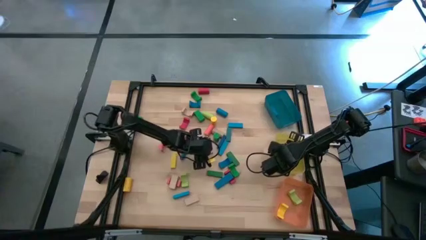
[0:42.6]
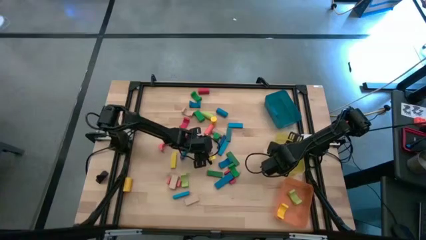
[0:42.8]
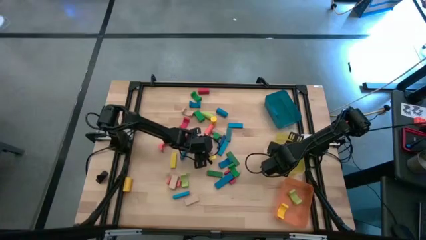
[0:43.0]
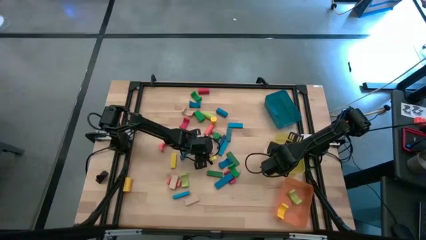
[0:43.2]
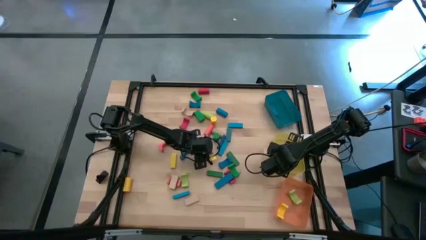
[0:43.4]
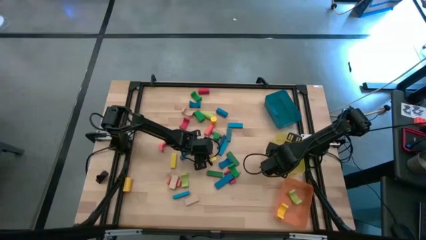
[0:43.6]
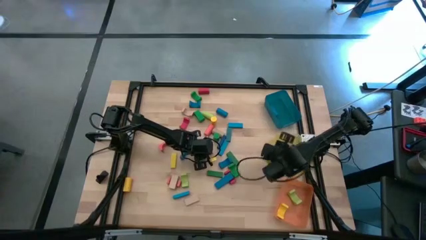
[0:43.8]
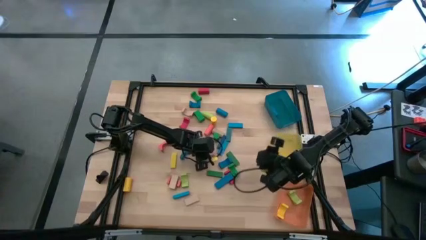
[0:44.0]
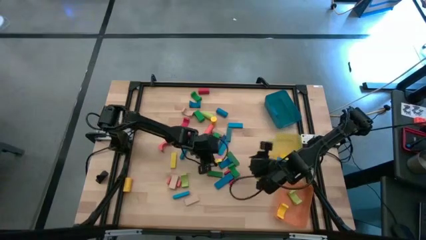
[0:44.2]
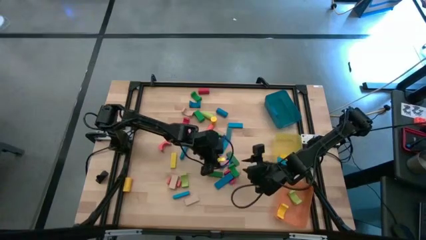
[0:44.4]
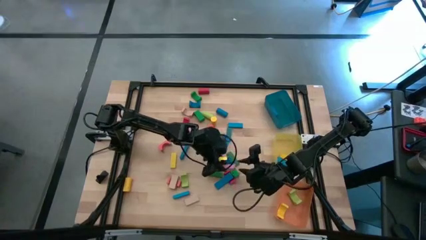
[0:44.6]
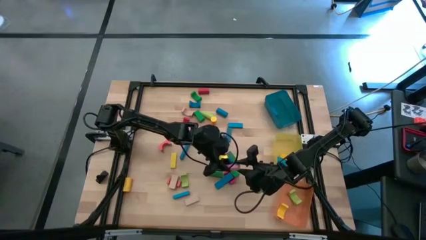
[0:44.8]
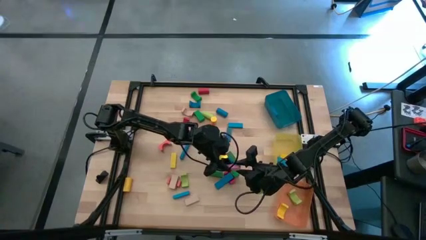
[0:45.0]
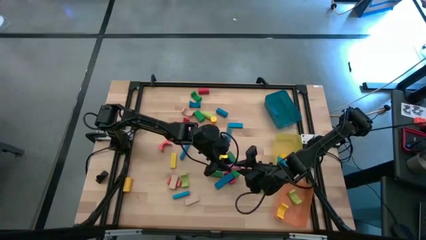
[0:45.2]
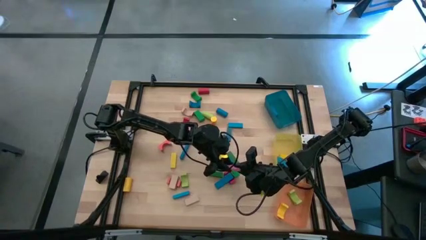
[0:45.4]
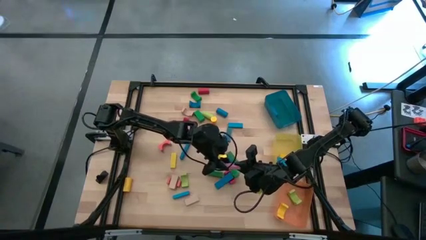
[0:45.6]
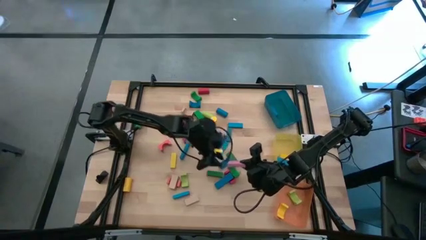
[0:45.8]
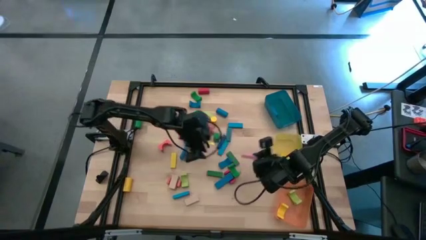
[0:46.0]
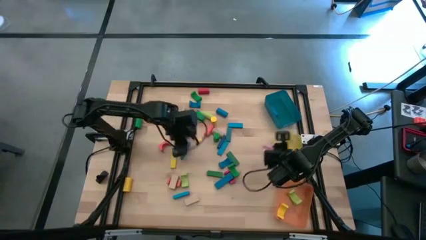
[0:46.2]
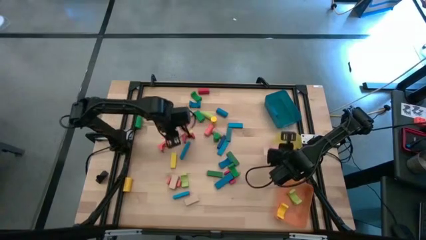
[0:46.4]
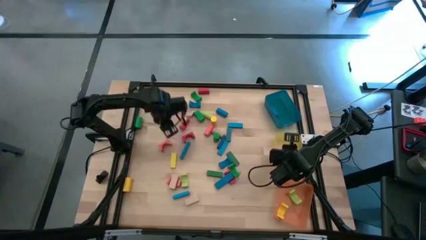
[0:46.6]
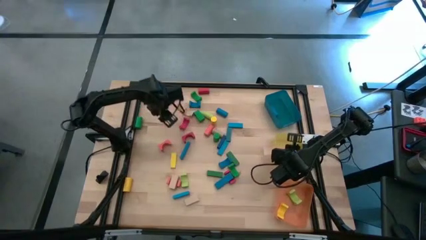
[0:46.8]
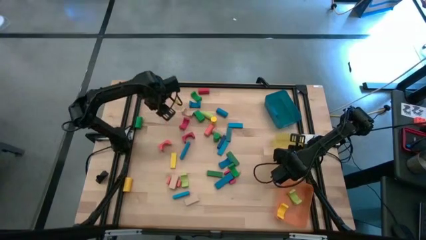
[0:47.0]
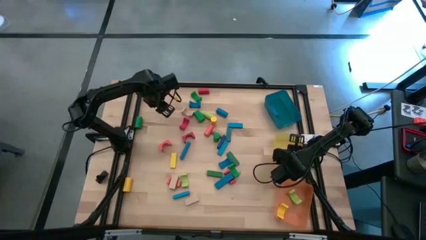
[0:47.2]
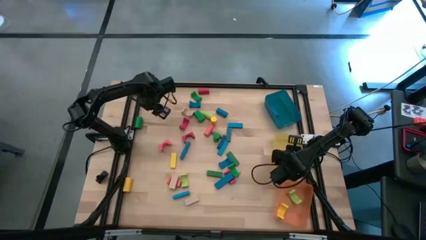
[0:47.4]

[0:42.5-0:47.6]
Task: Sort blocks by size
Put the pink rectangular block into the yellow bin

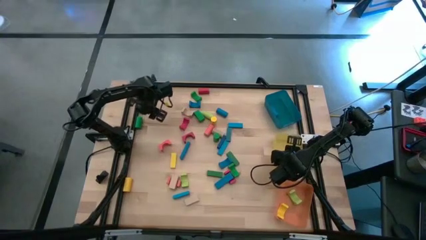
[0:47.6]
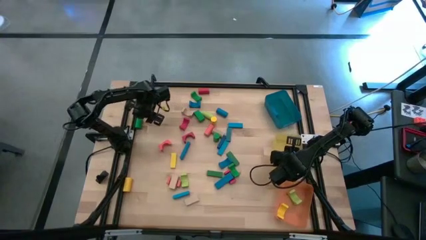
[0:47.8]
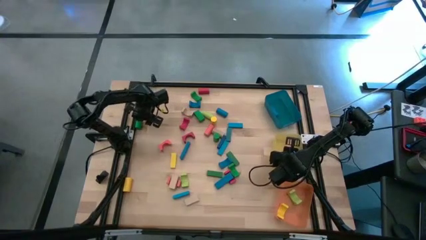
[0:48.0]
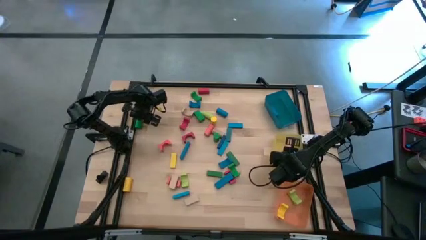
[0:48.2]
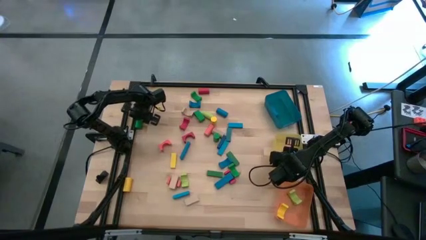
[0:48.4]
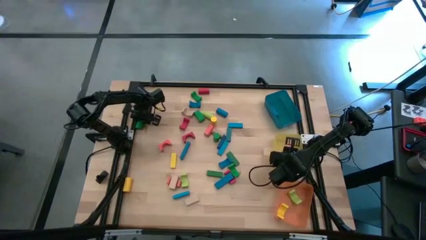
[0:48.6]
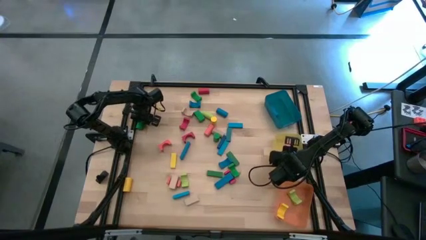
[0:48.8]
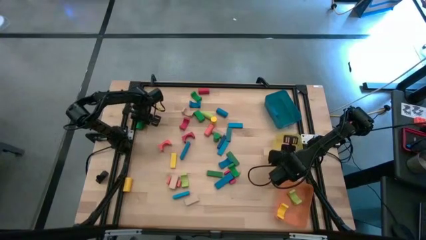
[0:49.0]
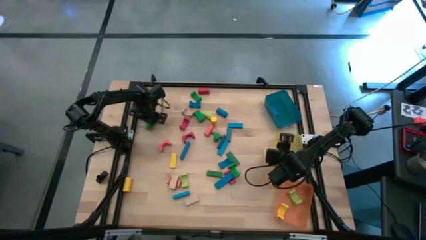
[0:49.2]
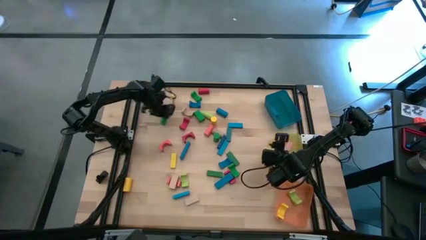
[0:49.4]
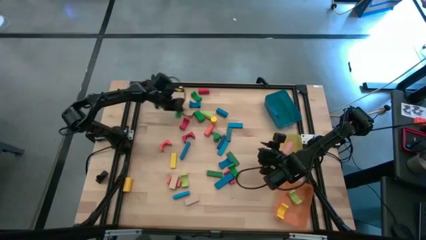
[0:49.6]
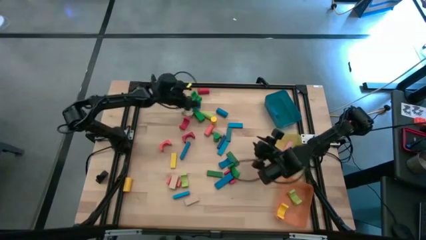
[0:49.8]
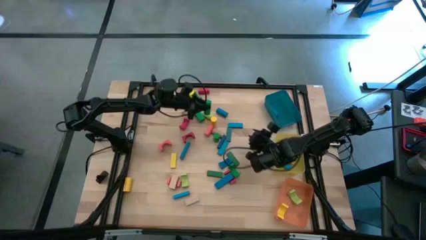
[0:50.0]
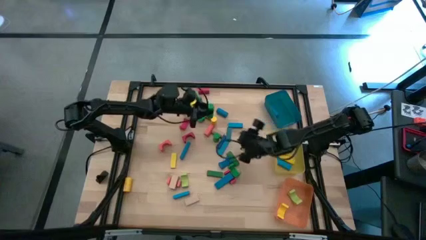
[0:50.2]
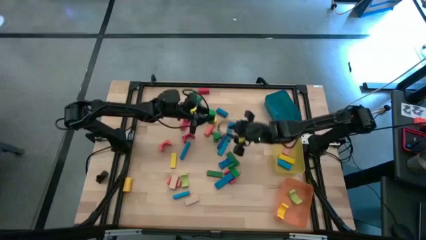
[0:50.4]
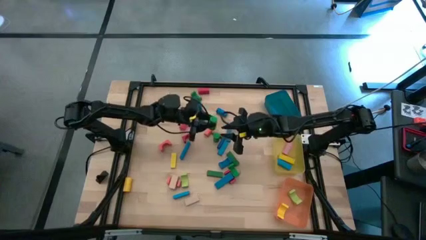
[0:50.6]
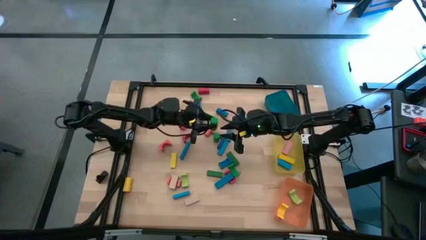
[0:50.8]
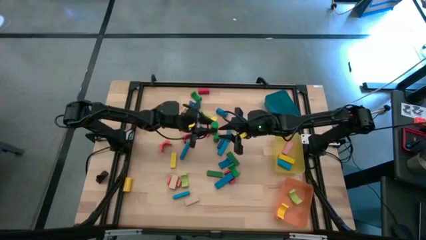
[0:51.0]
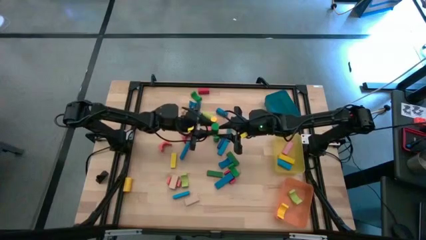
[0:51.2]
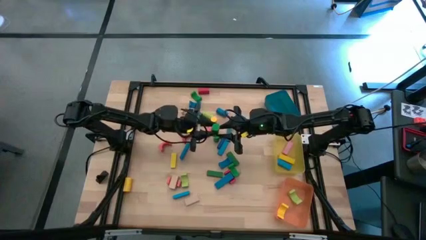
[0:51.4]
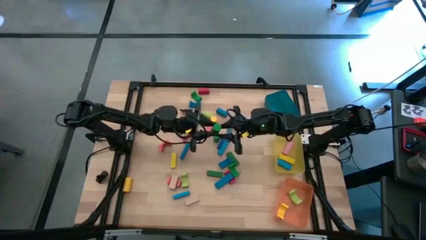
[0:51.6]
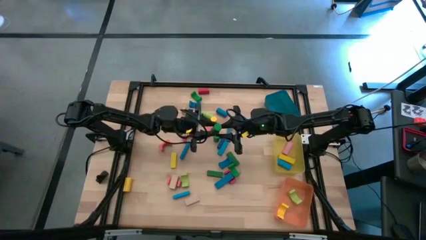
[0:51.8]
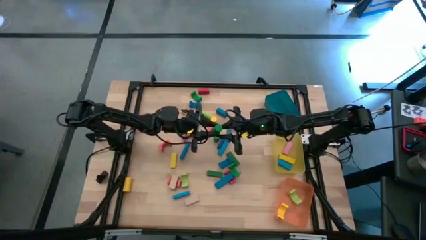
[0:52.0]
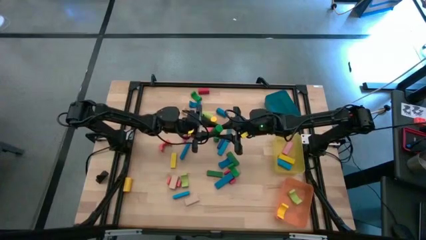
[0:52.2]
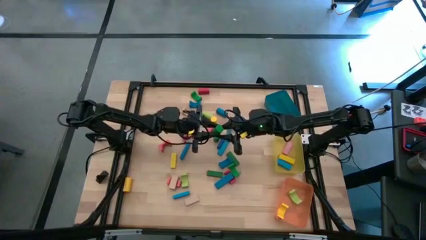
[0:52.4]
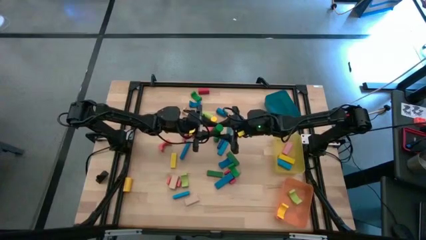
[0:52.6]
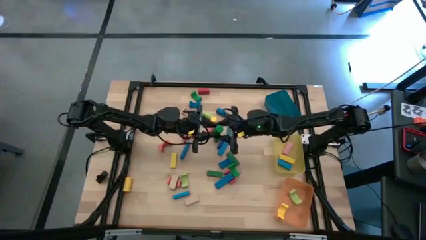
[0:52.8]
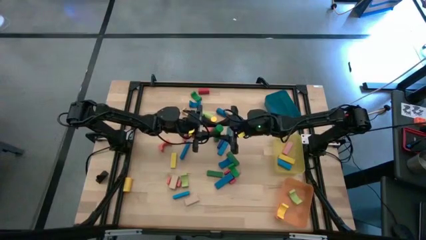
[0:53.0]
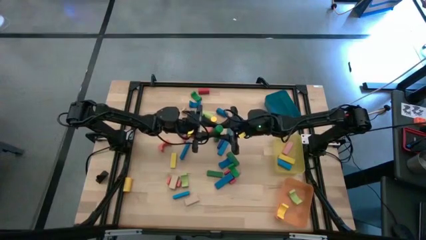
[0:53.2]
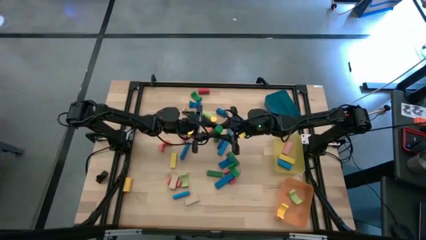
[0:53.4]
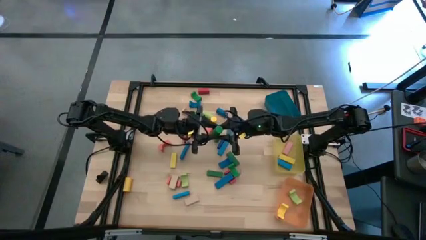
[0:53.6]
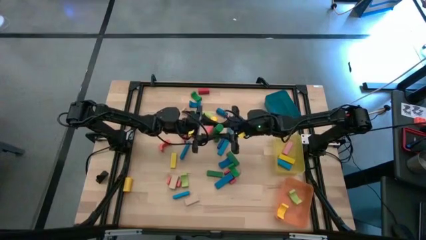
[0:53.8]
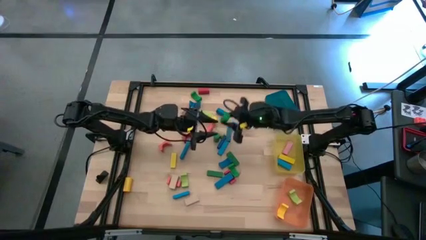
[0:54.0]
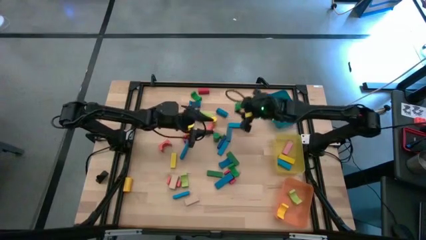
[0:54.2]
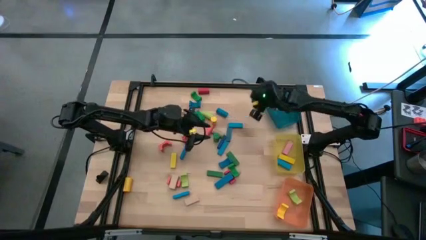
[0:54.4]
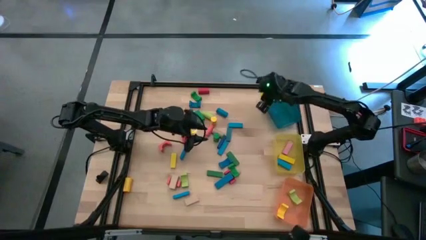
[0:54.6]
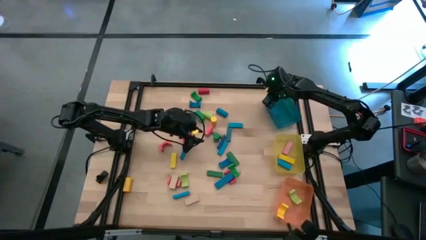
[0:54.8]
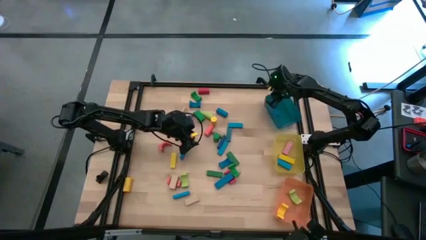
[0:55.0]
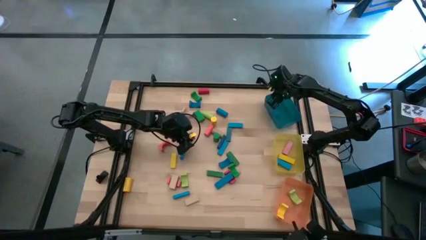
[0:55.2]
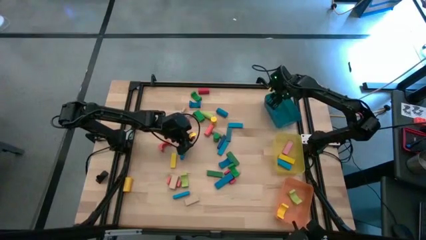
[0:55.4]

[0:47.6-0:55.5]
Put the green cylindrical block into the blue bin
